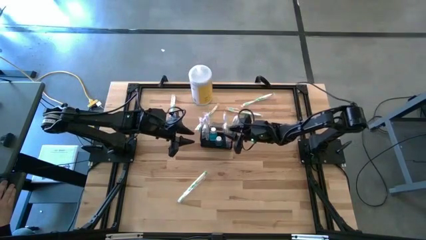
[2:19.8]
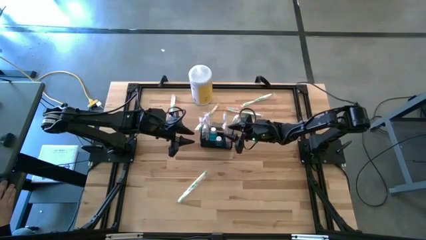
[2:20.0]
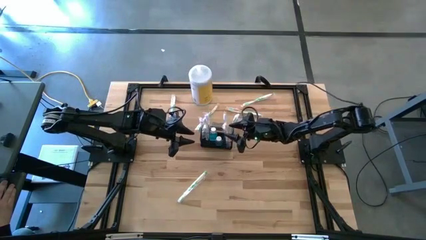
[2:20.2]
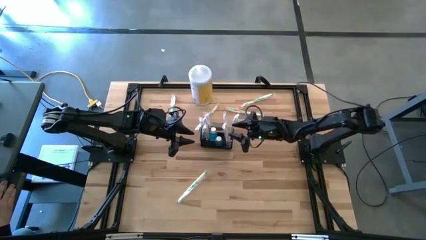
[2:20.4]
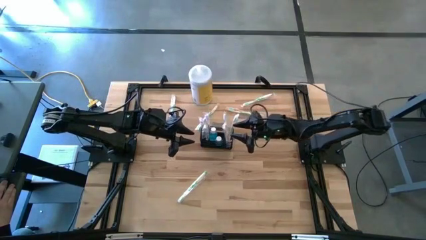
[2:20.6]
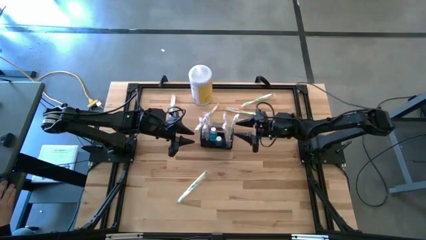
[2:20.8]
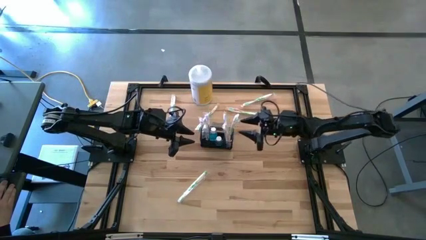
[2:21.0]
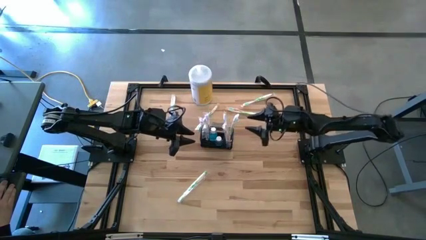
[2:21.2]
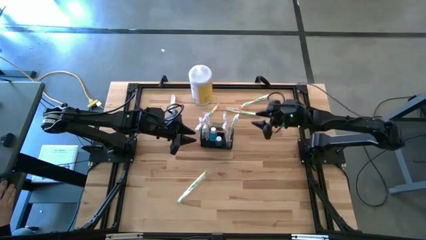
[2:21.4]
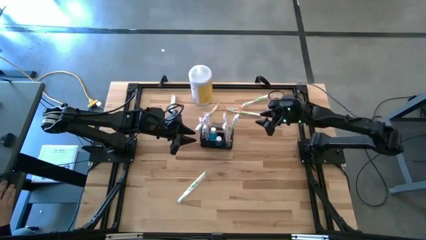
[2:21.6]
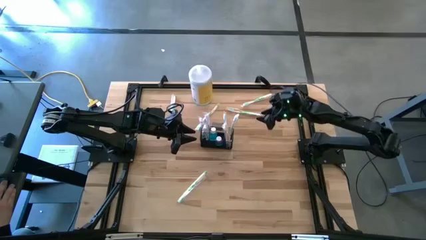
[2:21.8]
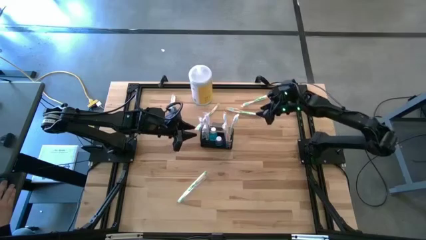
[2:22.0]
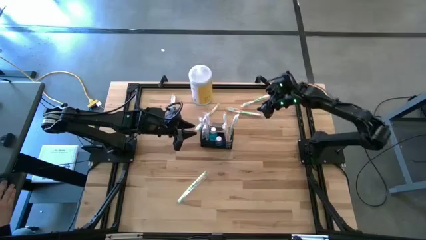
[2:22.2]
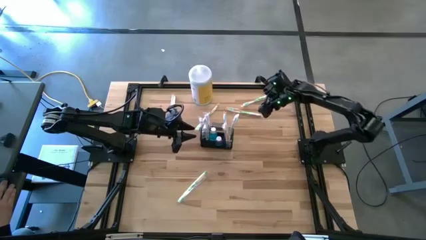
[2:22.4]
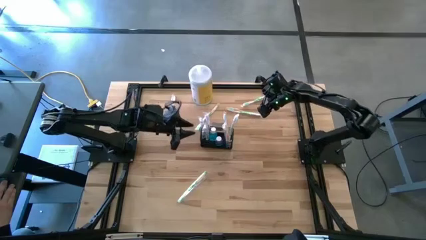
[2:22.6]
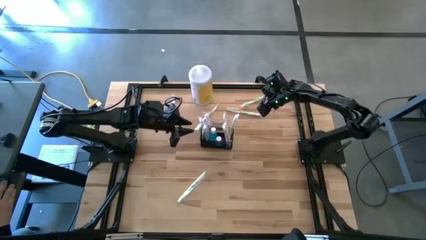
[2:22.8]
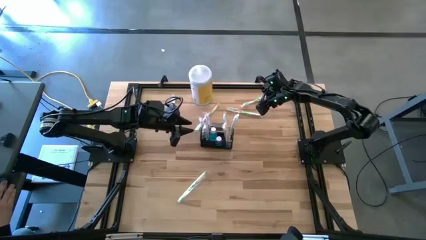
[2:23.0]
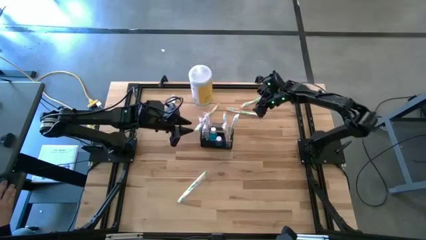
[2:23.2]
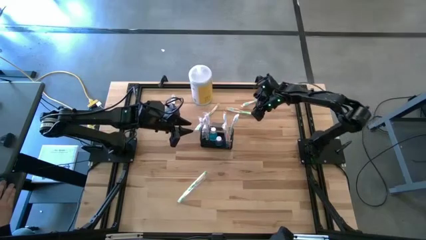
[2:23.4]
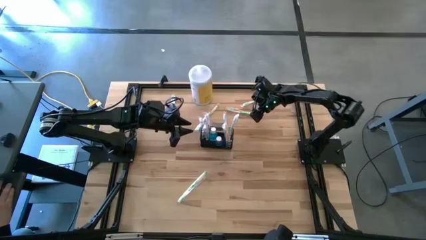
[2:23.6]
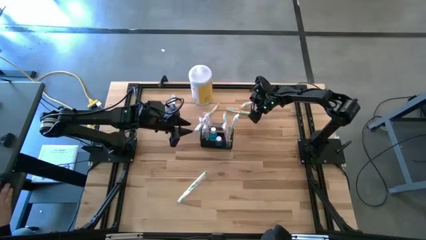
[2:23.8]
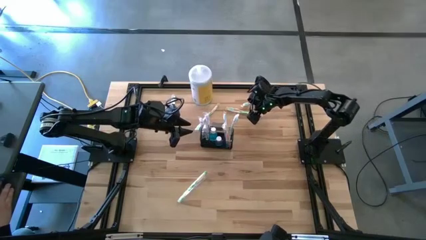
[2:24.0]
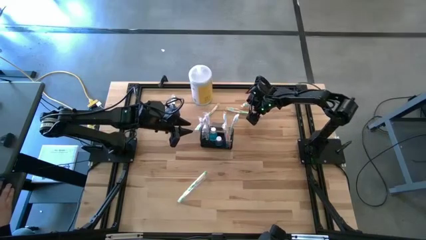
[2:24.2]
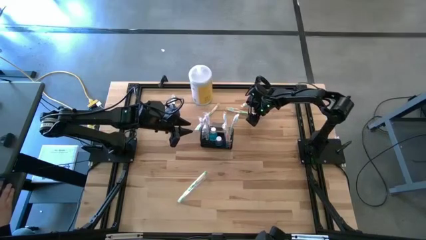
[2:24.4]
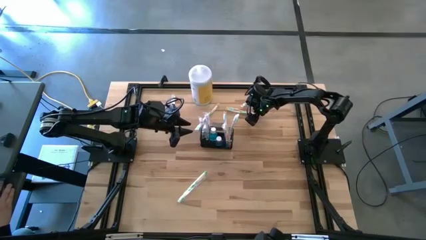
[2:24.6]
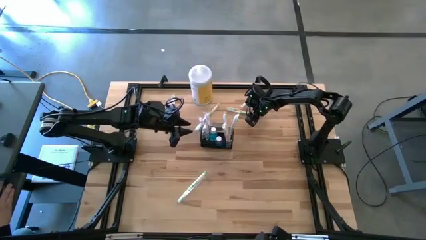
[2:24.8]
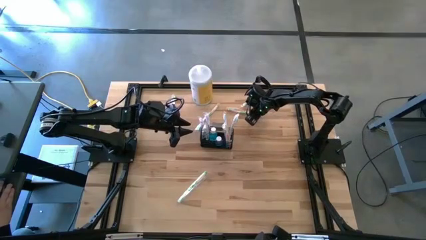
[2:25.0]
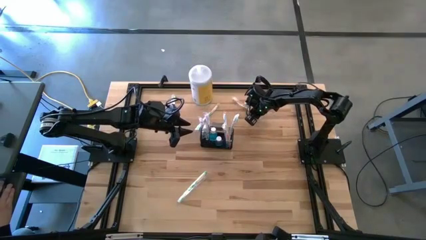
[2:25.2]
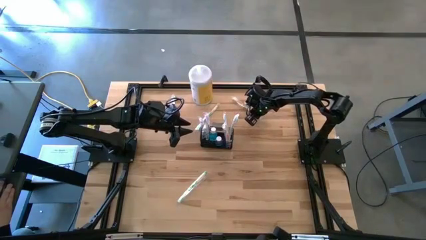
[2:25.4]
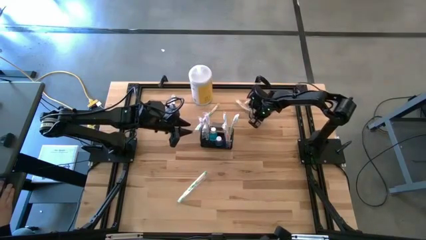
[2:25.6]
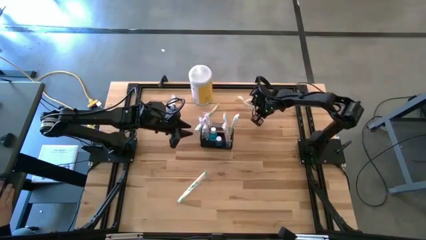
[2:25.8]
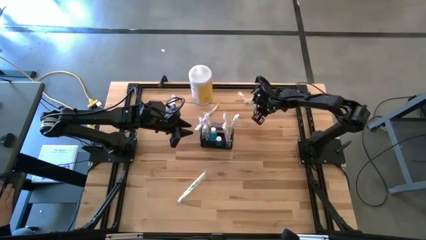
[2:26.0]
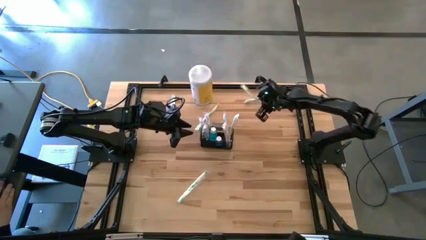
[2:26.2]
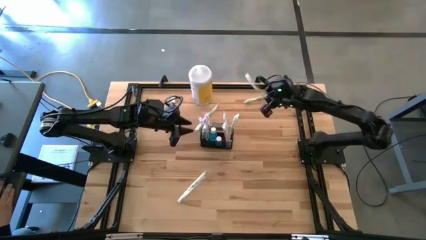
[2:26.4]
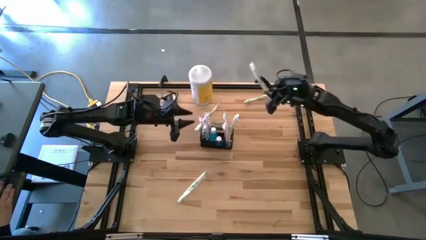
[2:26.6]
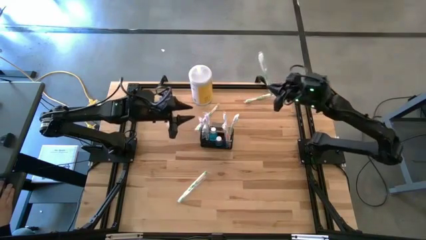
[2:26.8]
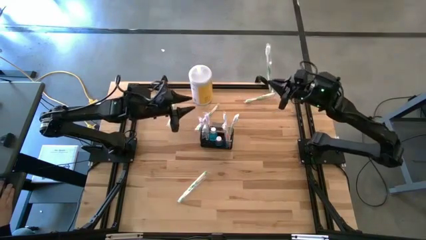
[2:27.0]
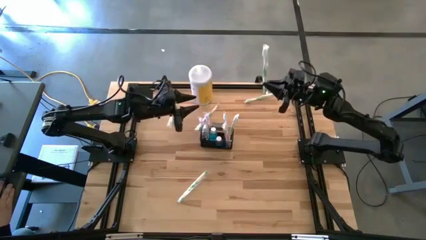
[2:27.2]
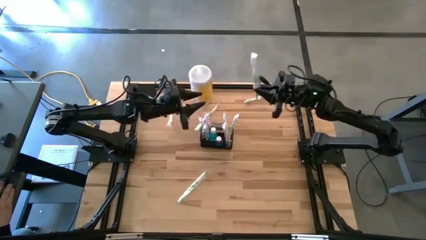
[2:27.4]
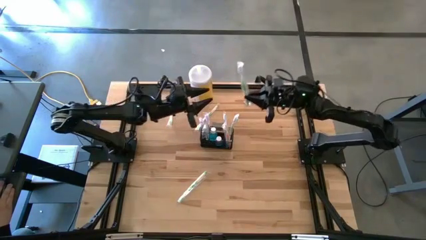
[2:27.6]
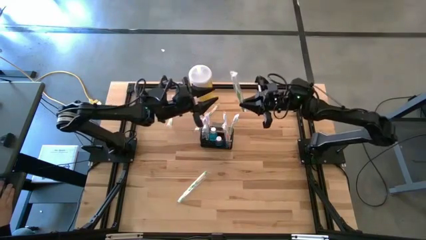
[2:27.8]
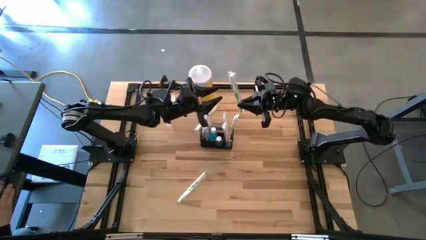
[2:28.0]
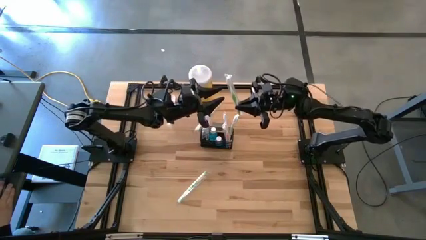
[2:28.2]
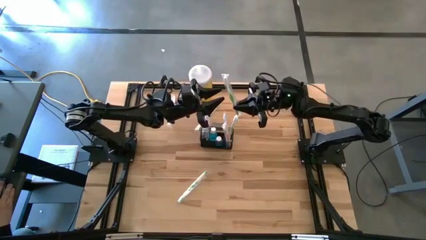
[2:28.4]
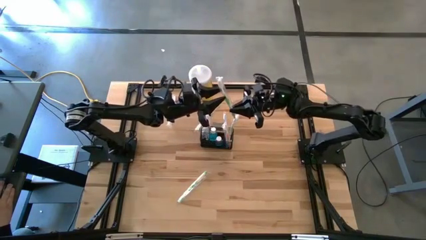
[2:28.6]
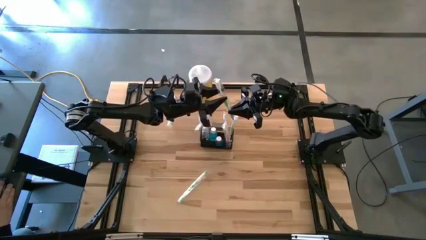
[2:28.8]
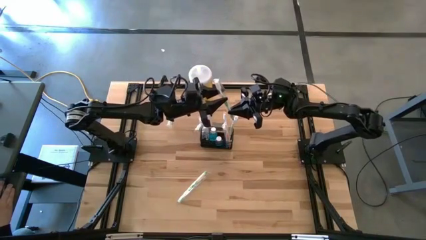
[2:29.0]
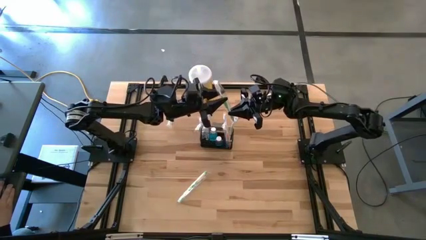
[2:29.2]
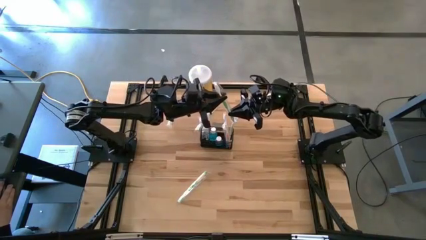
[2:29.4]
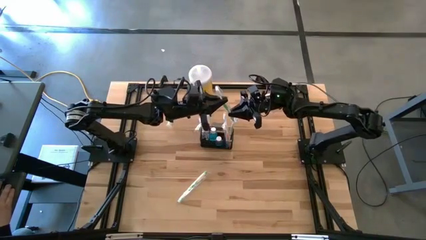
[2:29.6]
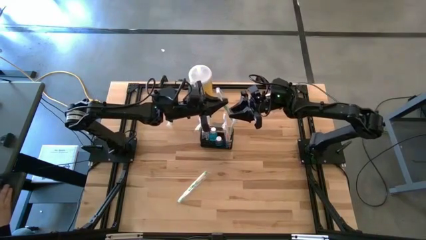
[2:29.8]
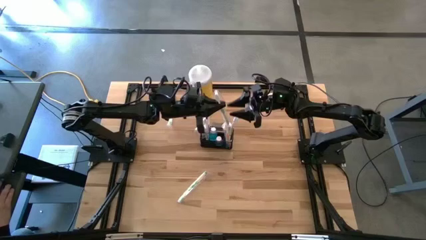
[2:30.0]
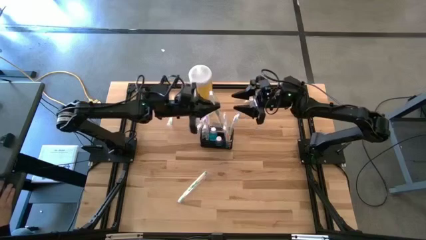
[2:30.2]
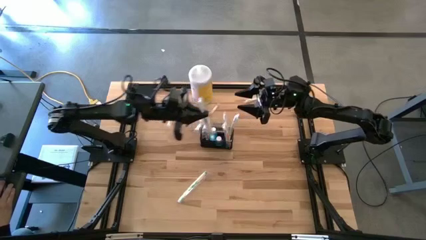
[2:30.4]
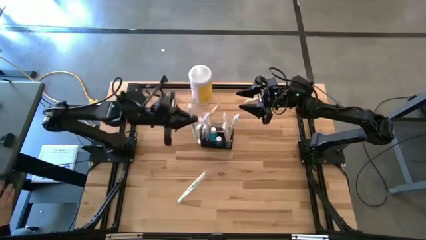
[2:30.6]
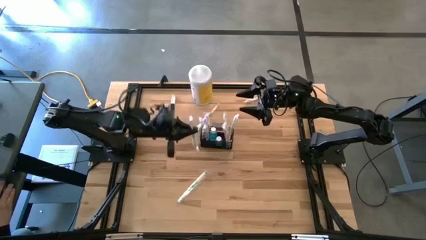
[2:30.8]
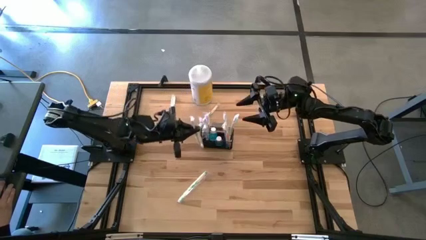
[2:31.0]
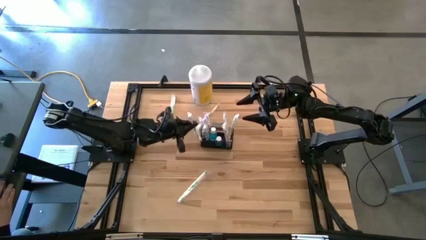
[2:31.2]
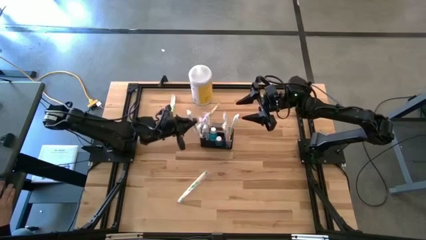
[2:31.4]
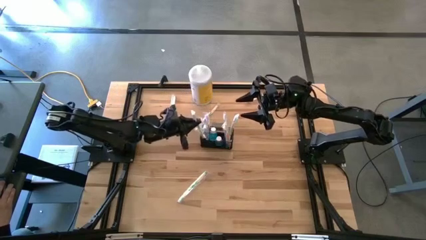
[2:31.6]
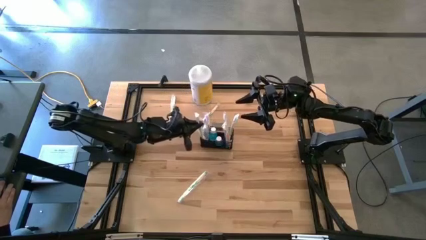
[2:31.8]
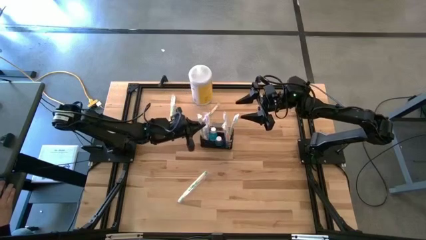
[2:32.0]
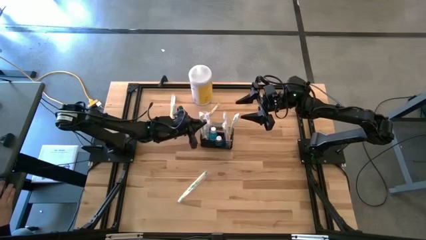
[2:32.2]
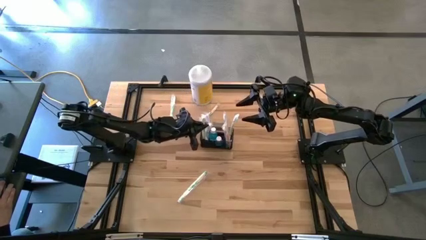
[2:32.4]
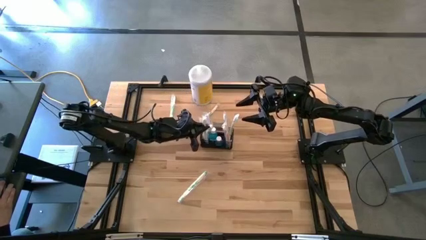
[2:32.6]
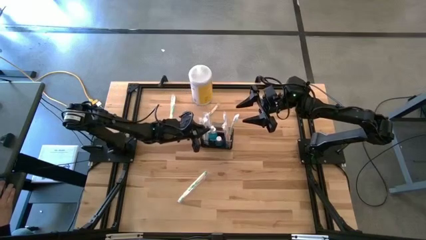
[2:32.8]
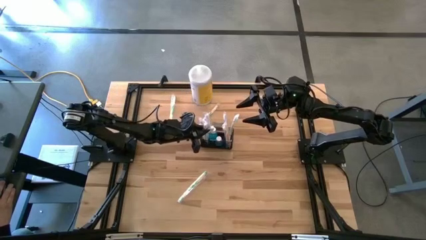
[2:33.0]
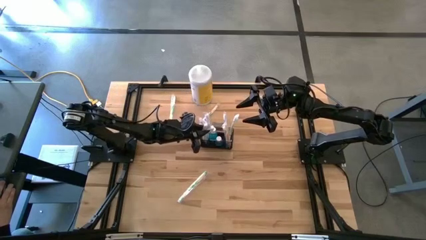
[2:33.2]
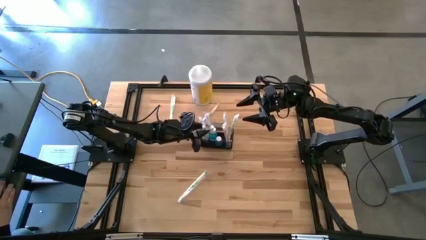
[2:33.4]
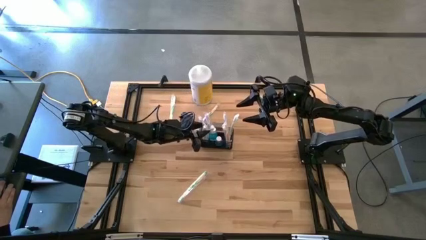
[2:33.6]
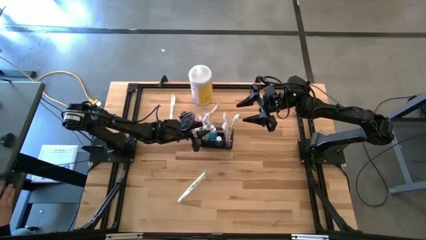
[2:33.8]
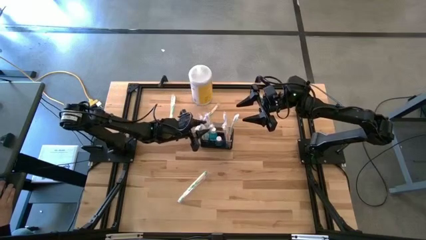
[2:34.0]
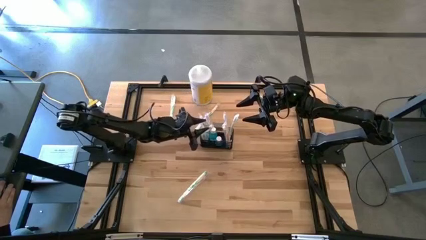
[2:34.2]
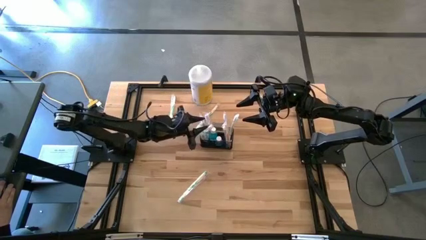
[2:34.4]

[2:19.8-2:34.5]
Task: Pick & Place toothbrushing station
Put the green toothbrush into the left section wire organizer

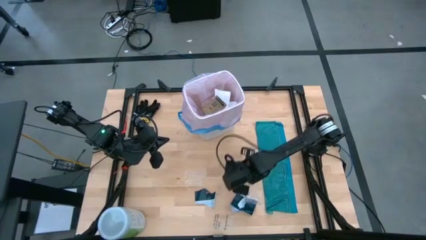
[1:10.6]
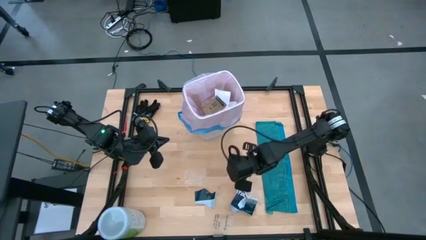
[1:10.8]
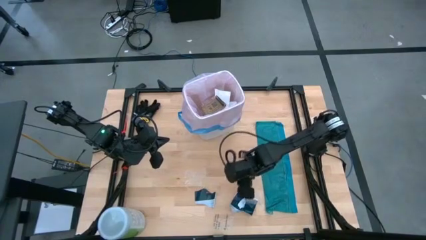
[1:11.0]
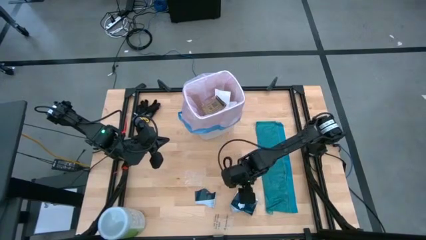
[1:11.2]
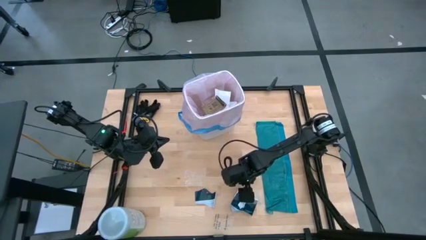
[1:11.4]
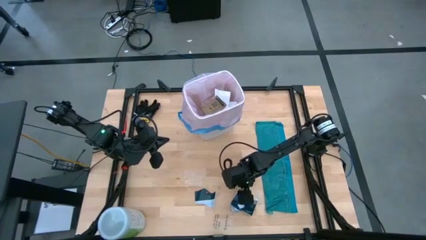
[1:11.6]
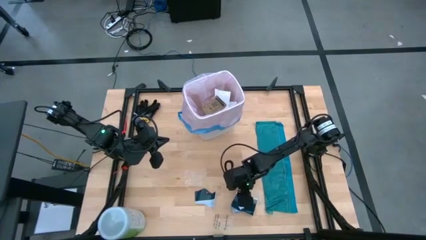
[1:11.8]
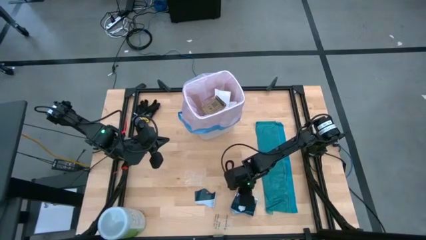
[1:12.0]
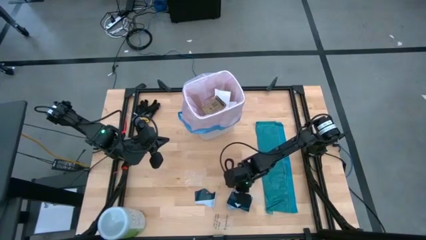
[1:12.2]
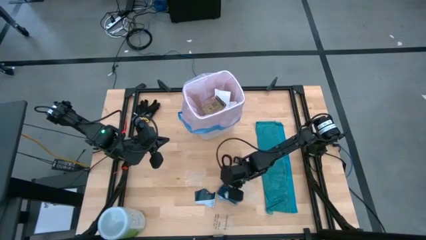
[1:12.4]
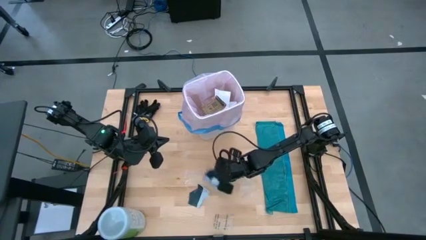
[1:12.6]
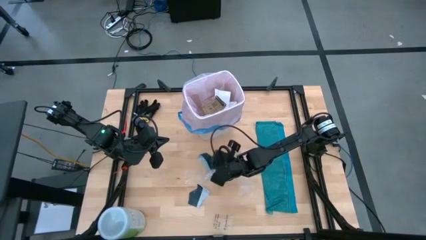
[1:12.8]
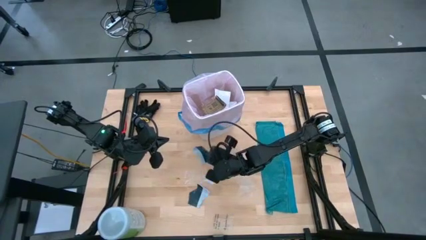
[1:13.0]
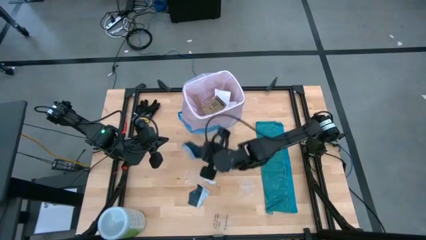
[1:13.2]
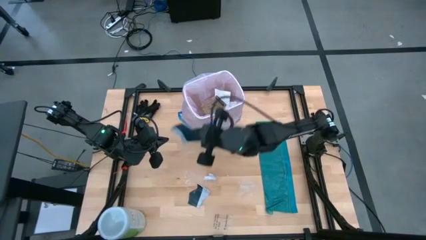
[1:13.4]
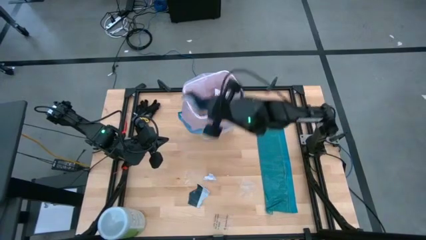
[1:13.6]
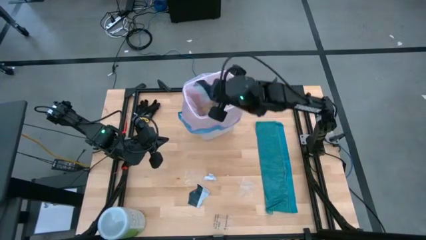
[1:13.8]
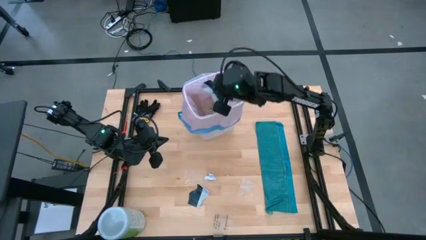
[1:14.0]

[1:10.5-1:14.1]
Task: place trash/remove bag and relplace
Put the black paper into the white trash bin
